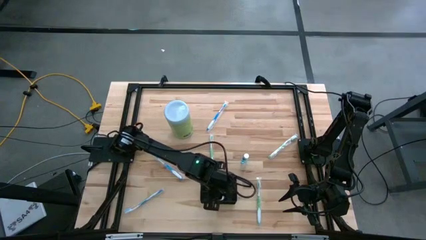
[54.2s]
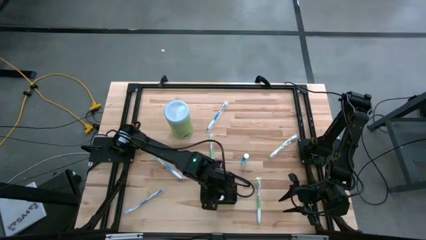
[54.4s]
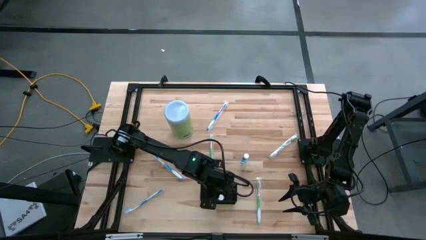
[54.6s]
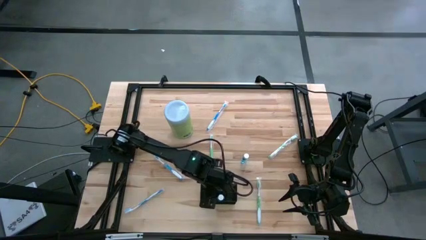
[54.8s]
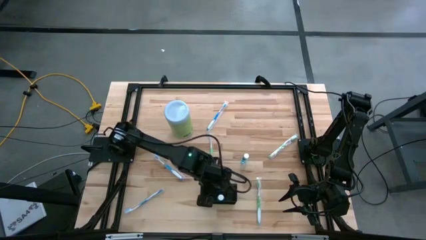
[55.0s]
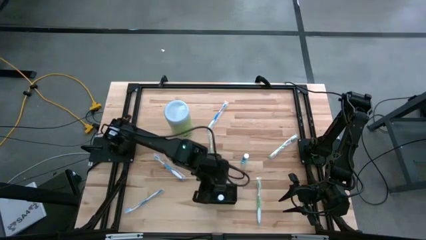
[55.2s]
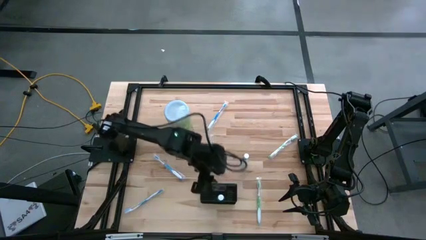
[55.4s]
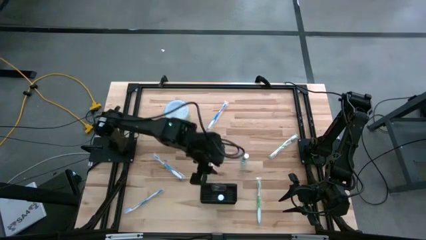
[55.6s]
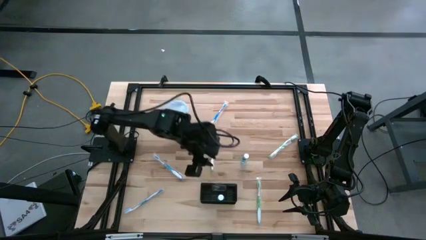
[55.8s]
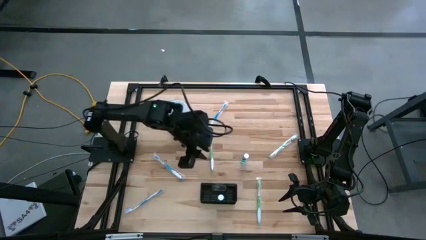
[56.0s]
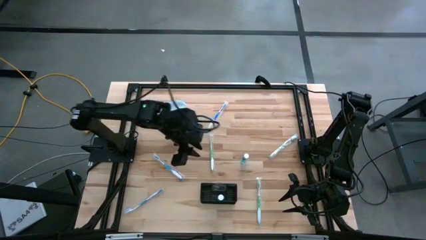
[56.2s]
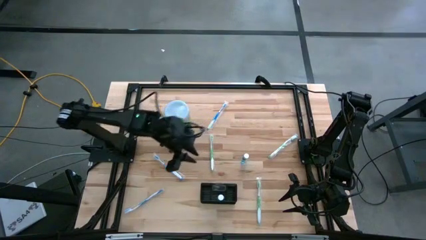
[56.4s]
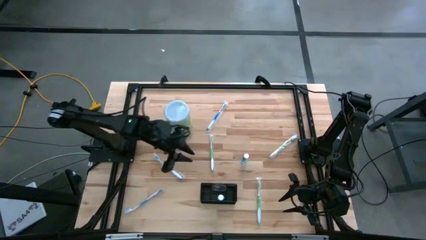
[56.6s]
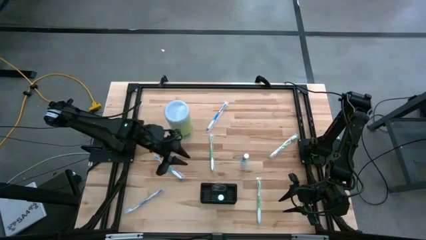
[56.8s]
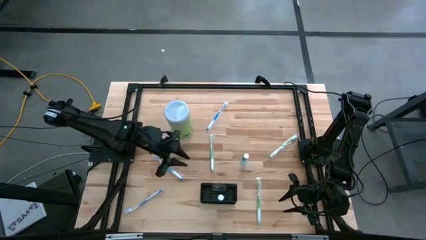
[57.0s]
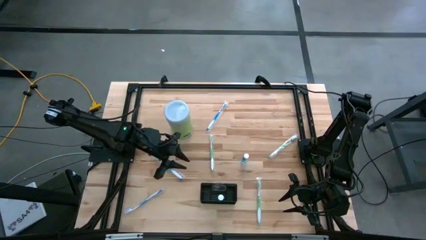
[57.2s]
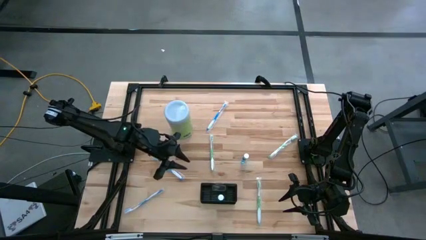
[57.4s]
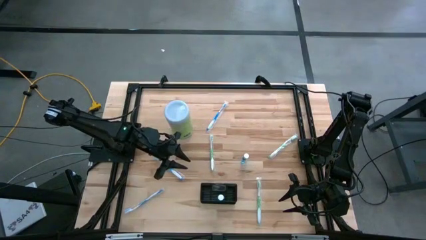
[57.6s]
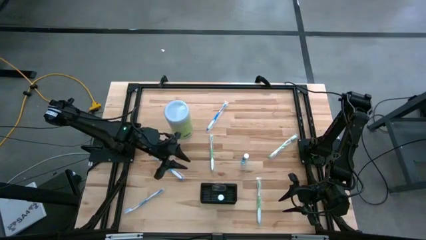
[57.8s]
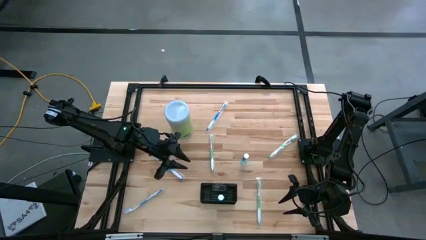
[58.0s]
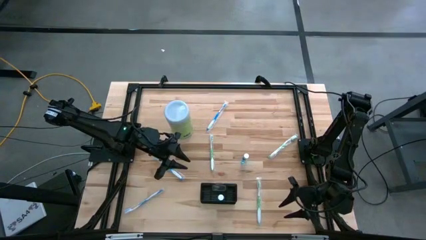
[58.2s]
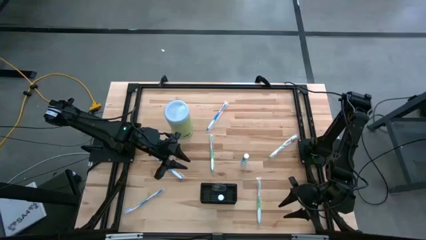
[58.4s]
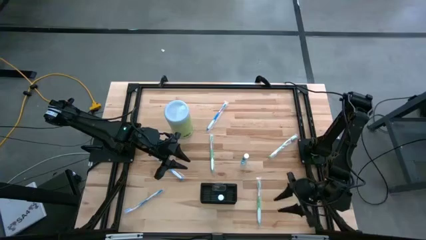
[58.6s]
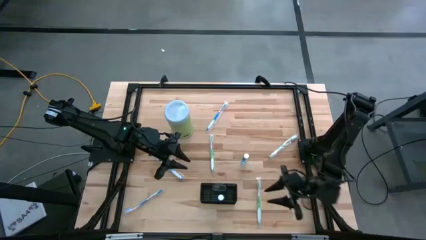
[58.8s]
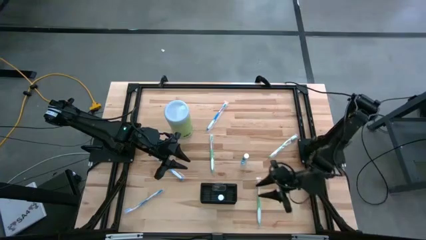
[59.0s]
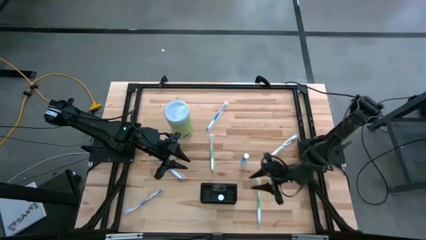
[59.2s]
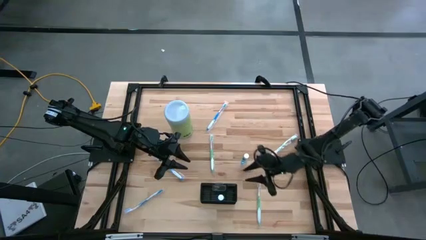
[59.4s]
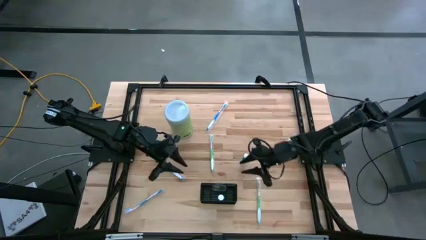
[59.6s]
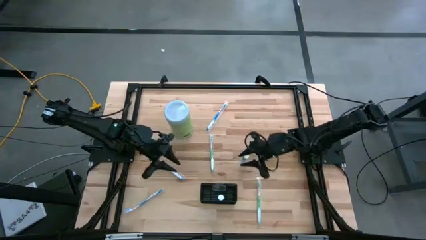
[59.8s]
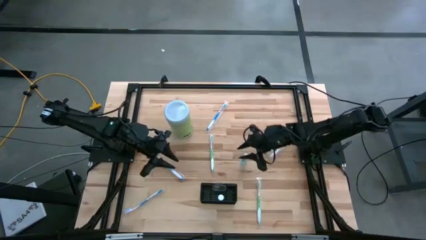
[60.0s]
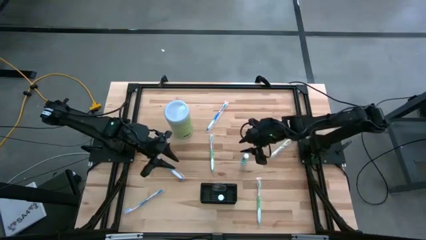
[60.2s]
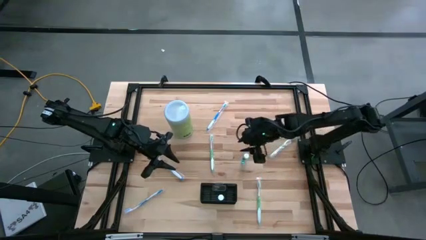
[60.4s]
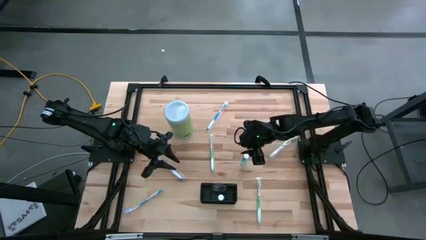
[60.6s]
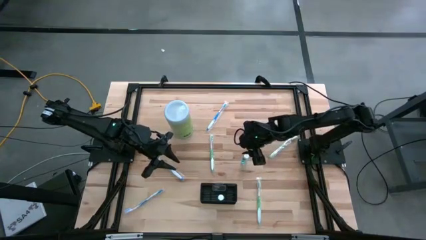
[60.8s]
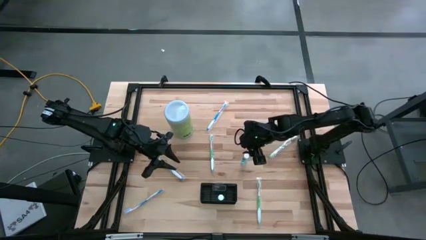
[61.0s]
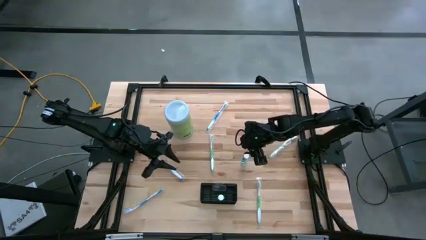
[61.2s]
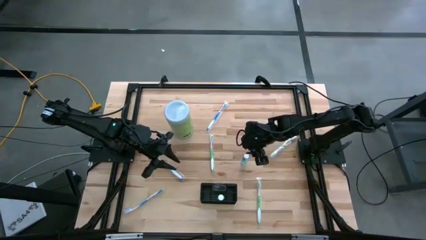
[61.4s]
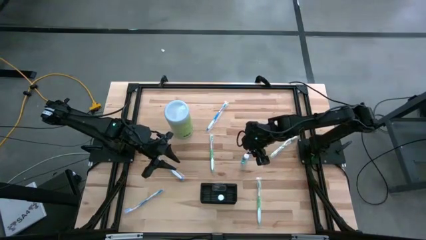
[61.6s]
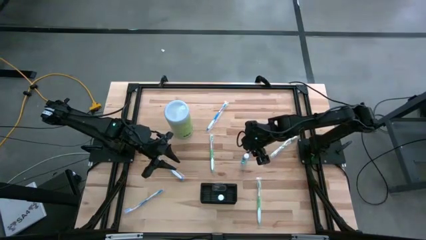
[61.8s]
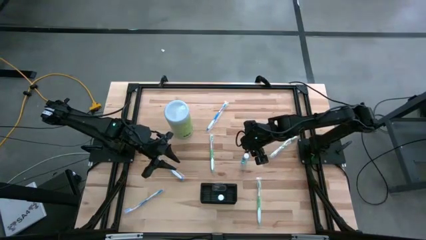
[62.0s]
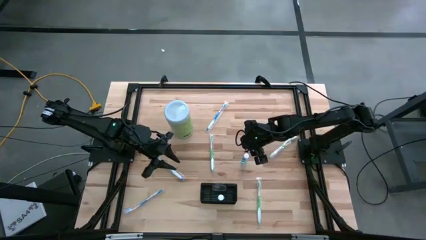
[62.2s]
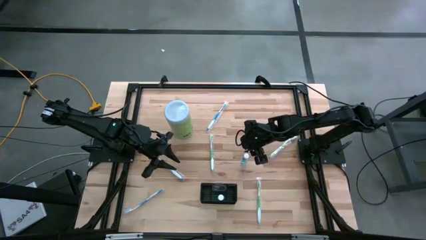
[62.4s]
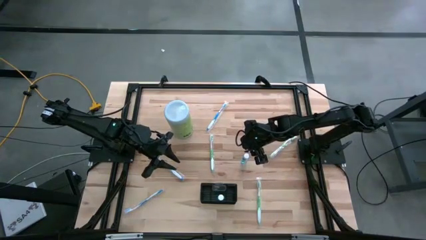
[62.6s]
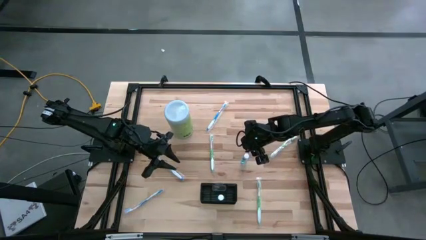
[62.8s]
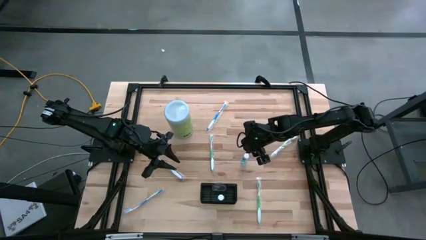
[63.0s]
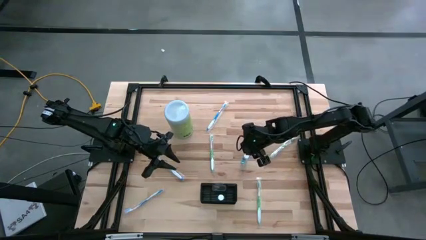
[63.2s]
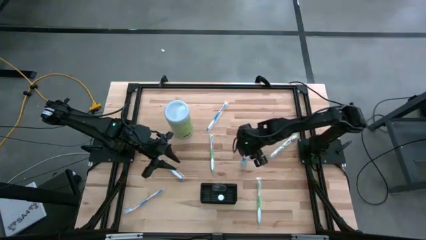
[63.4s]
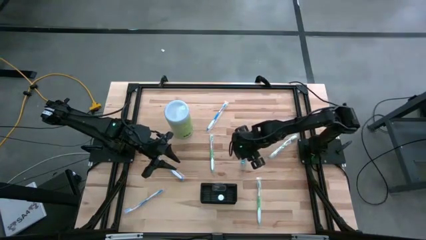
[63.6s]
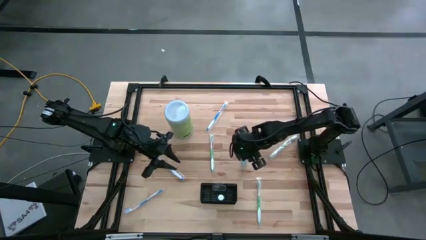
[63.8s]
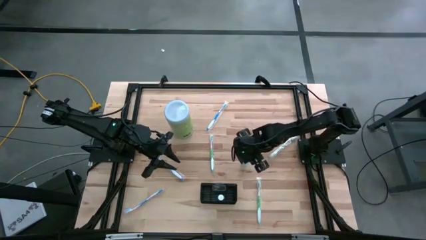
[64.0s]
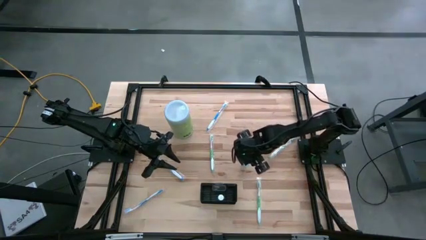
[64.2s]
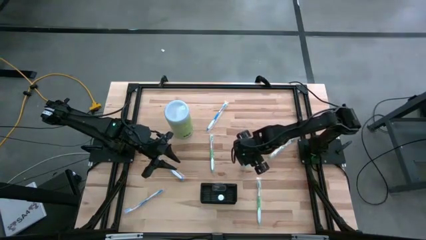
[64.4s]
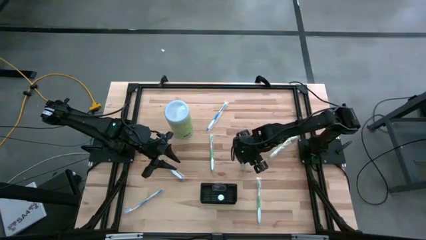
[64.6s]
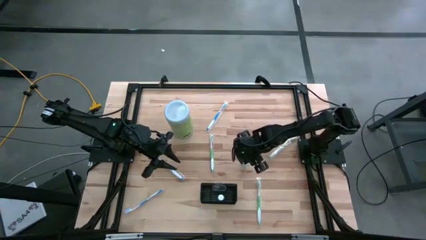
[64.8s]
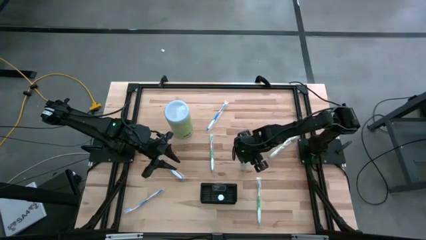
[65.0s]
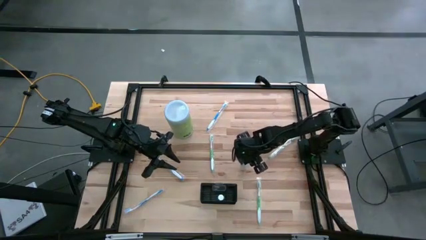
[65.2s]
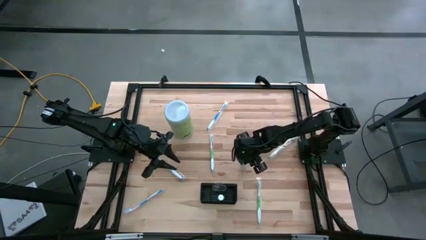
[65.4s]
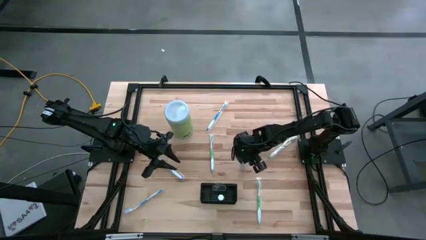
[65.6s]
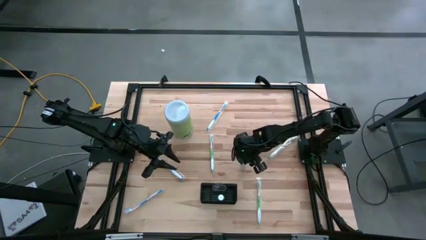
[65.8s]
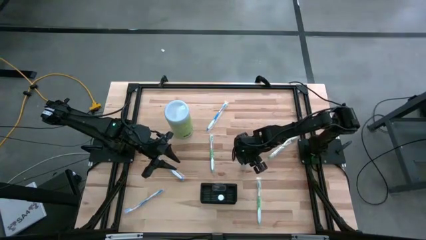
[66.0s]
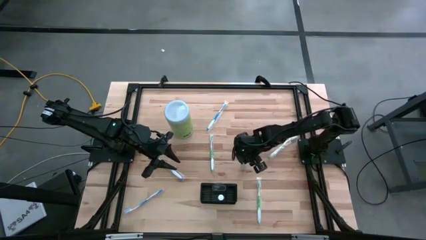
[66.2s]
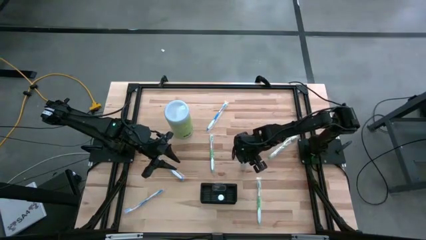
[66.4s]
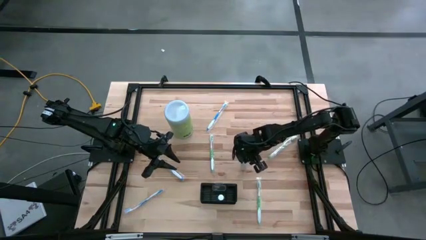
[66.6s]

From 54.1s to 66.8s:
Task: Pick & Place toothbrushing station
Put the mouthwash into the mesh organizer
